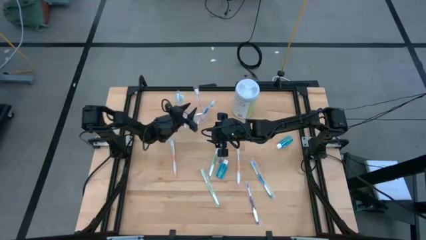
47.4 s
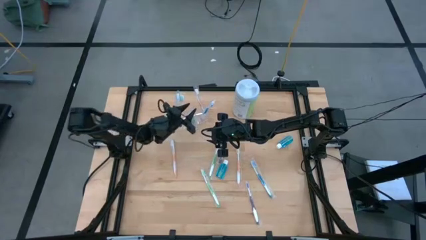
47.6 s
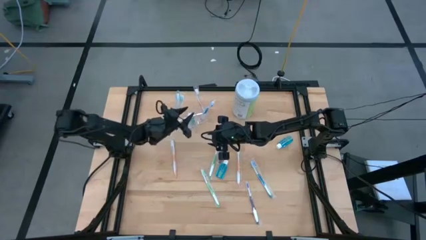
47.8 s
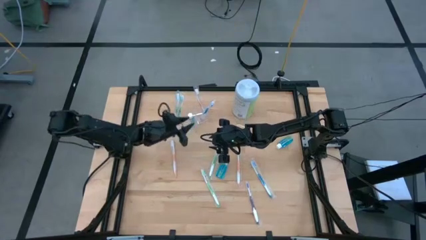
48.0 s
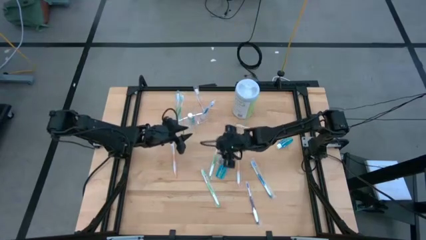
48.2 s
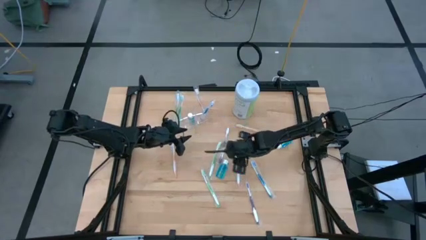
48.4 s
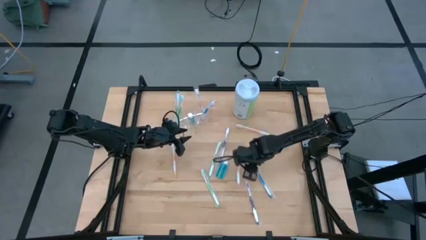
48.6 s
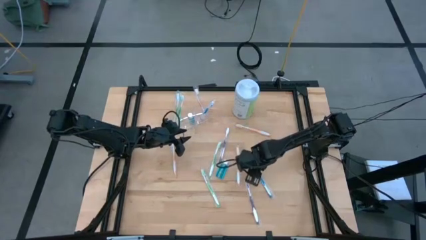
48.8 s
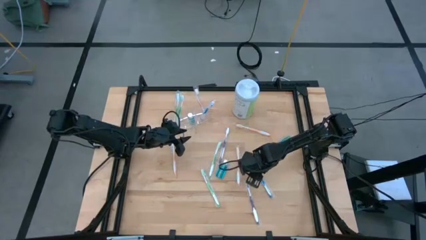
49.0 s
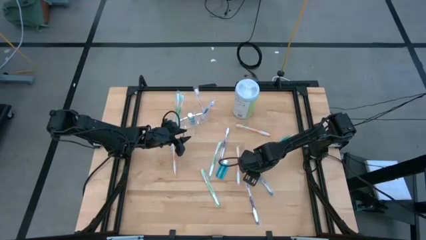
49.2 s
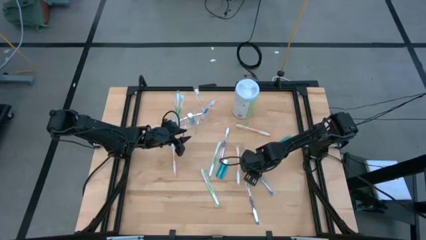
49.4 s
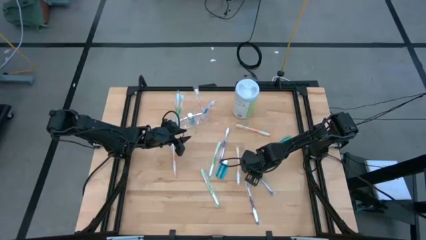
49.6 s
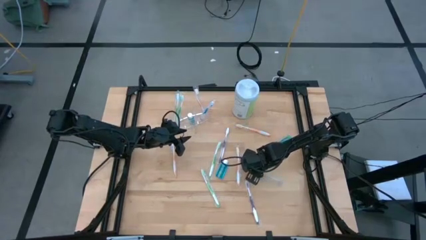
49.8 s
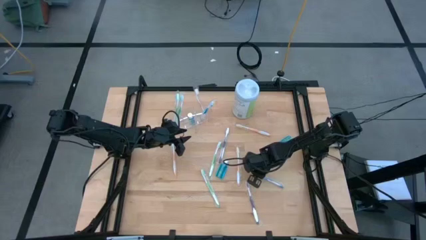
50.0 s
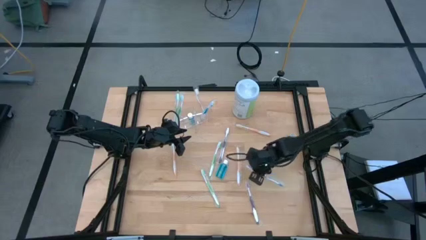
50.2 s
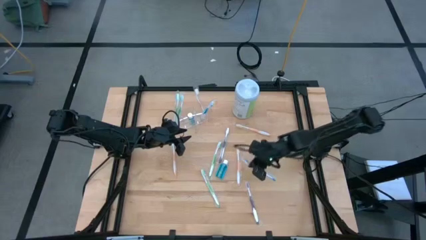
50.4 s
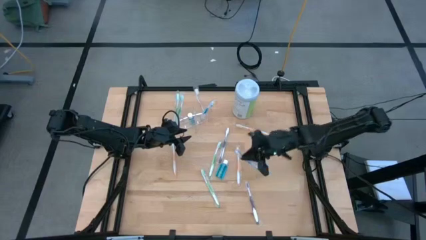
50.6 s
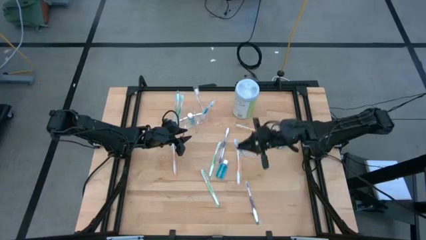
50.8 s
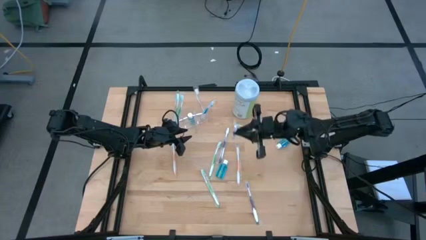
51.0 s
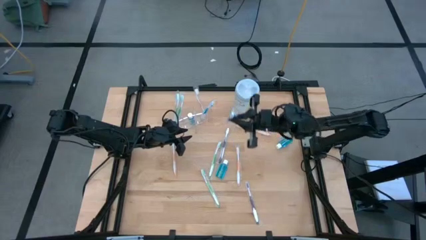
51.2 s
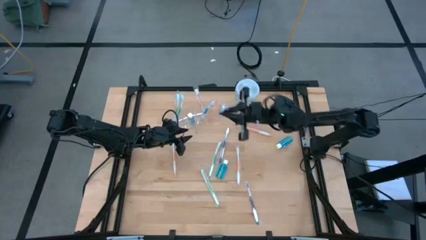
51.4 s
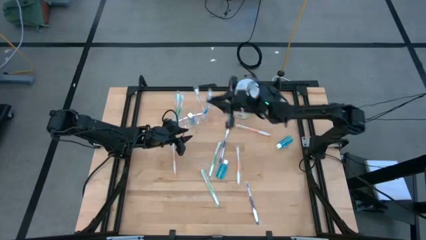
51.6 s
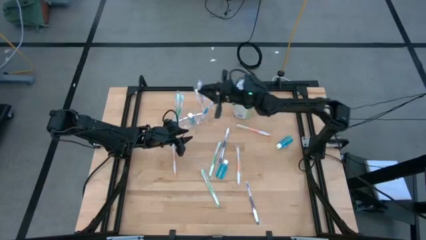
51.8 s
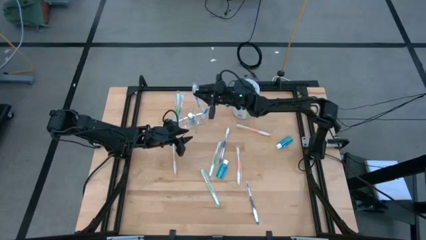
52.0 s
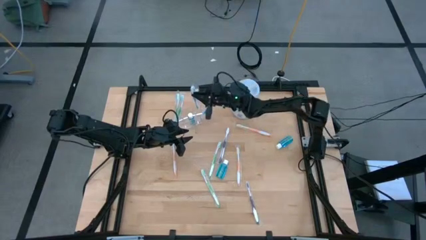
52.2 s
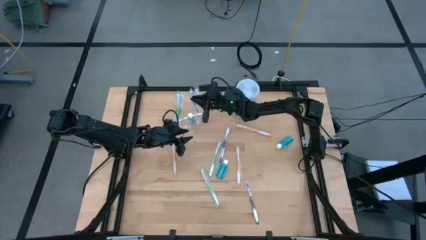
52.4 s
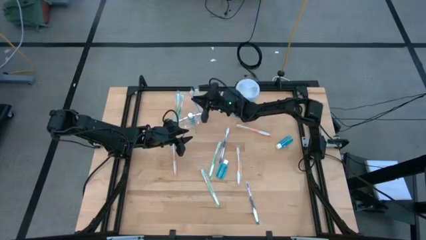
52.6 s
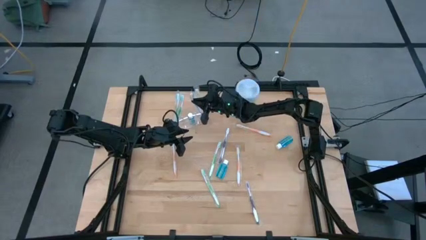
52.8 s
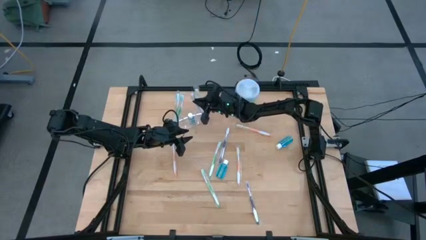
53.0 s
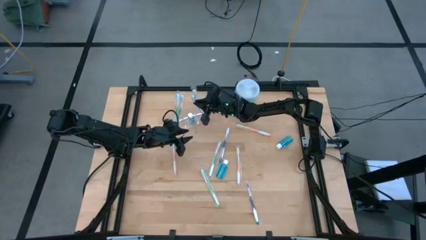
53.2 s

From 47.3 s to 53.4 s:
Task: Pick & Place toothbrushing station
Put the blue toothbrush into the transparent organizer

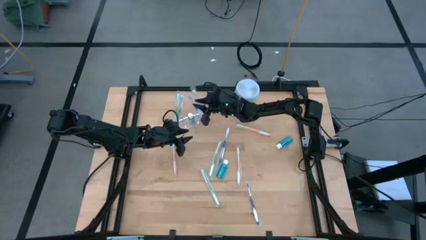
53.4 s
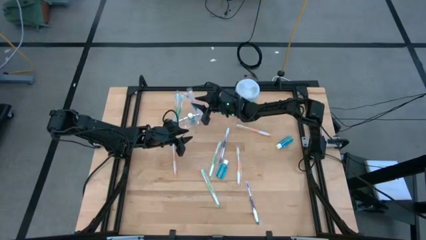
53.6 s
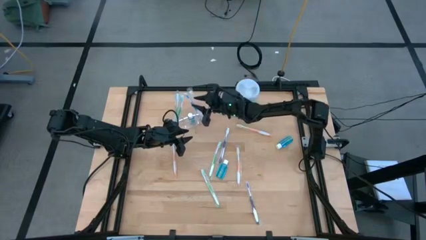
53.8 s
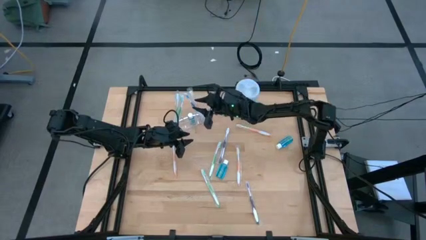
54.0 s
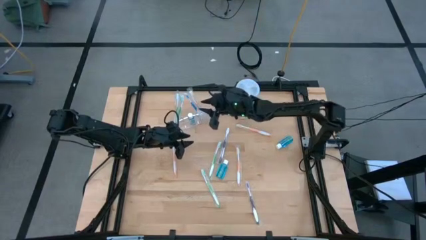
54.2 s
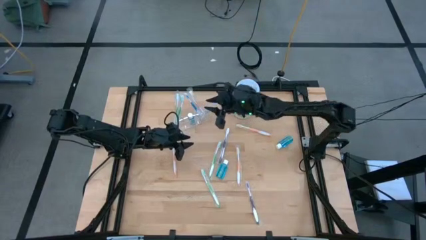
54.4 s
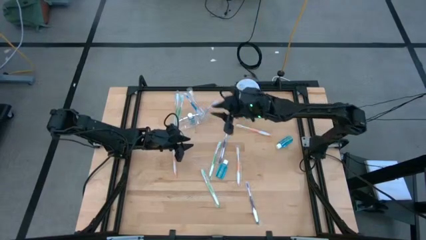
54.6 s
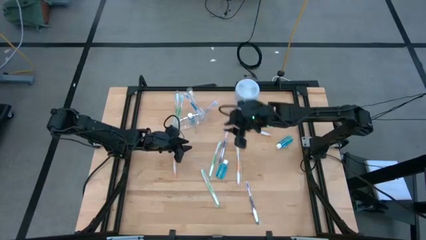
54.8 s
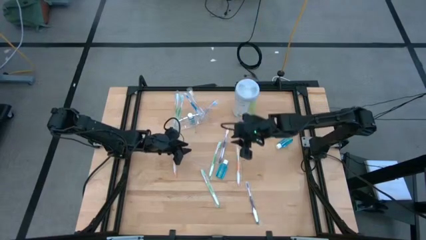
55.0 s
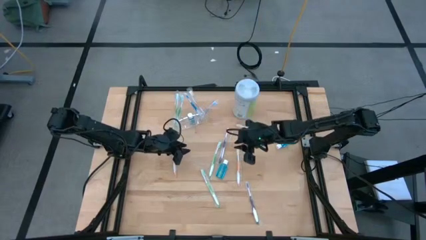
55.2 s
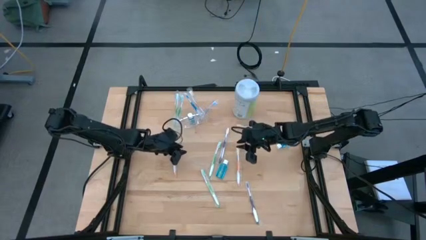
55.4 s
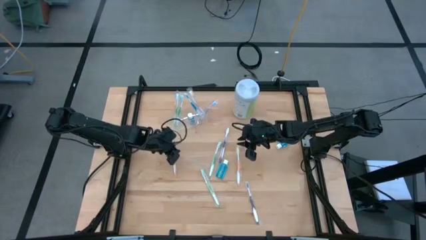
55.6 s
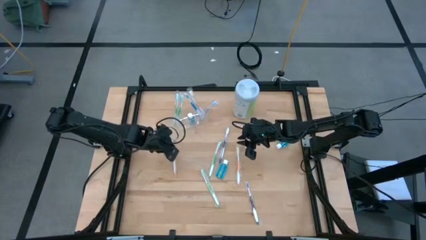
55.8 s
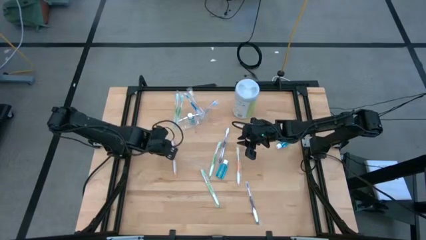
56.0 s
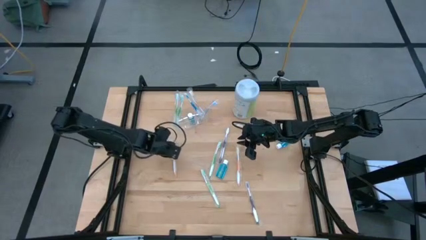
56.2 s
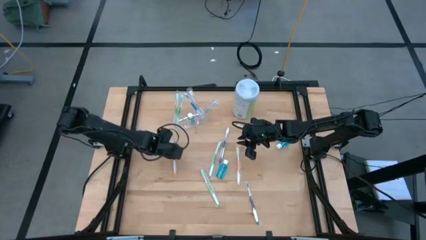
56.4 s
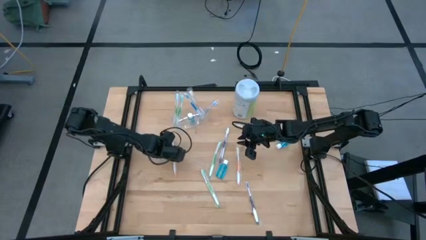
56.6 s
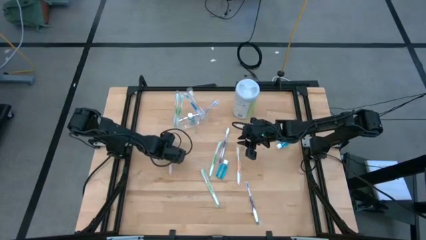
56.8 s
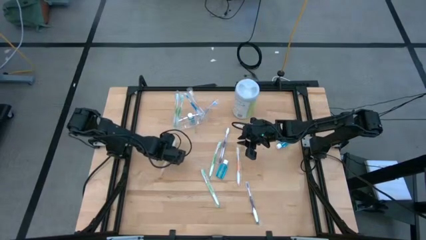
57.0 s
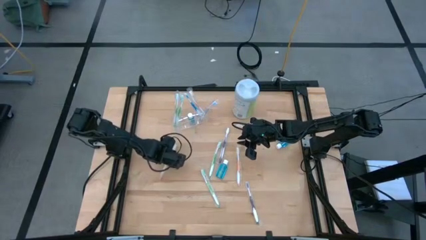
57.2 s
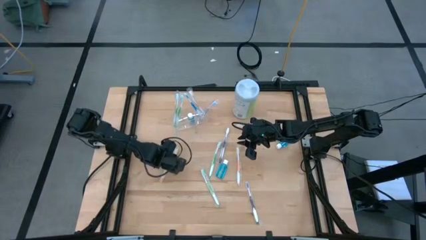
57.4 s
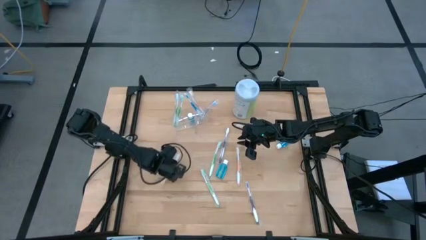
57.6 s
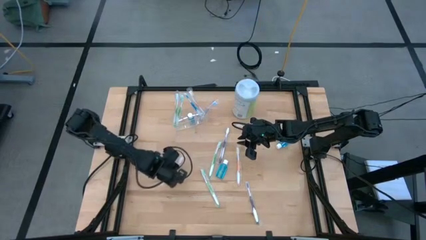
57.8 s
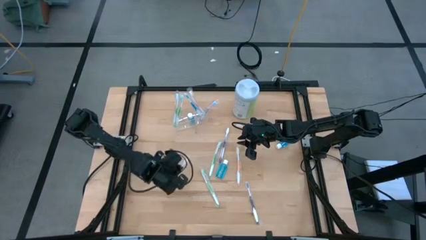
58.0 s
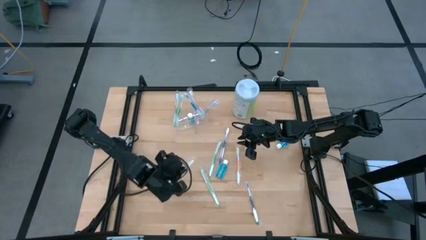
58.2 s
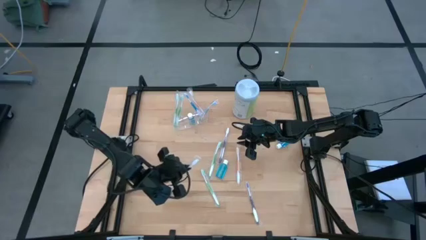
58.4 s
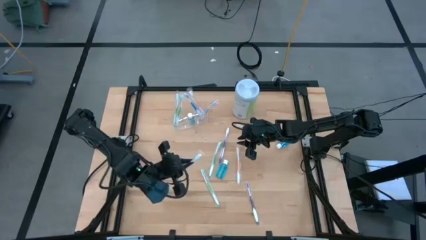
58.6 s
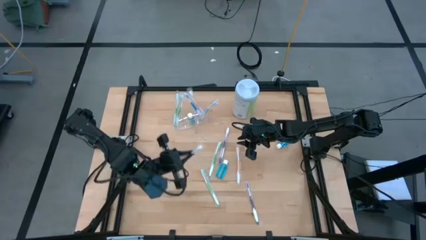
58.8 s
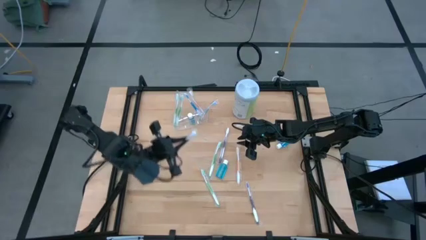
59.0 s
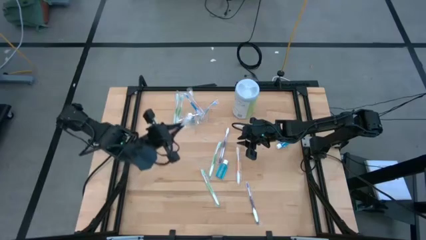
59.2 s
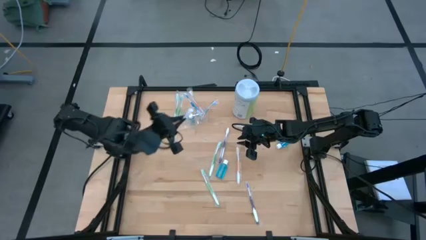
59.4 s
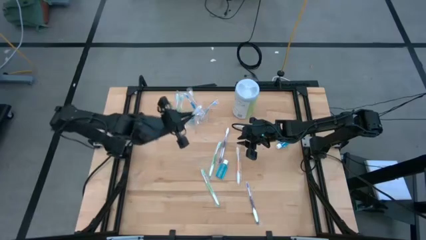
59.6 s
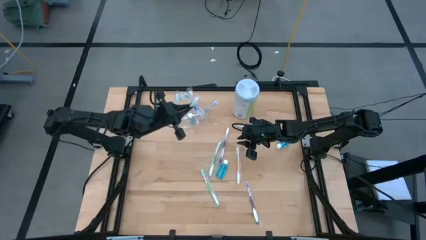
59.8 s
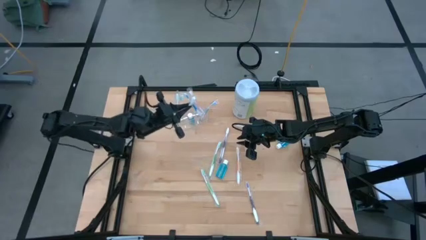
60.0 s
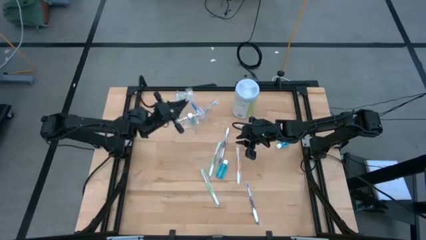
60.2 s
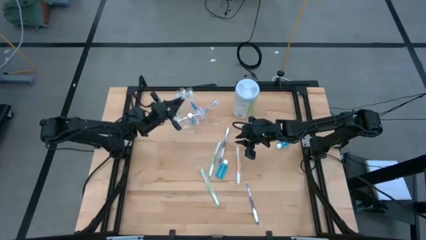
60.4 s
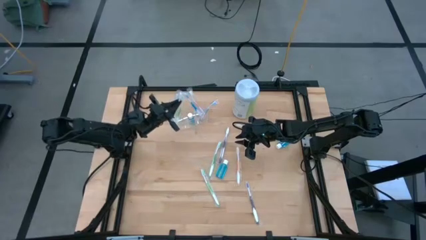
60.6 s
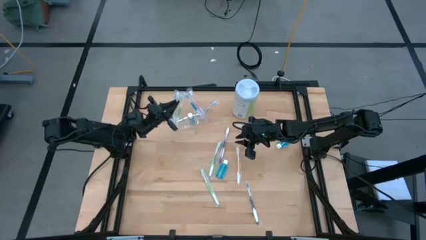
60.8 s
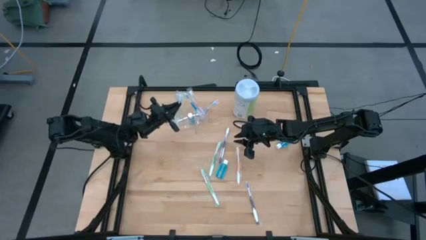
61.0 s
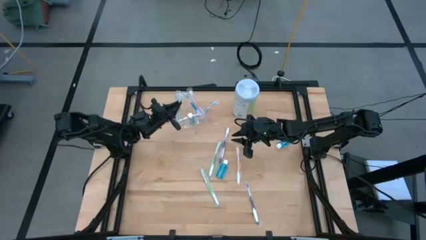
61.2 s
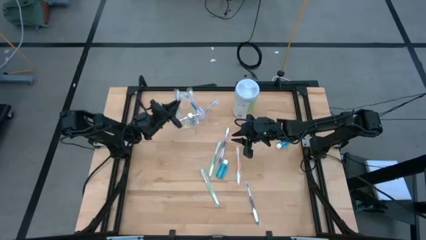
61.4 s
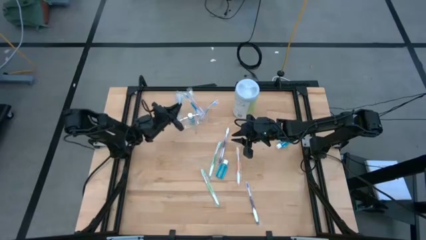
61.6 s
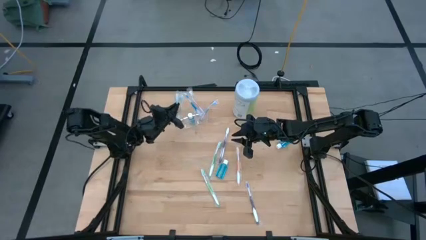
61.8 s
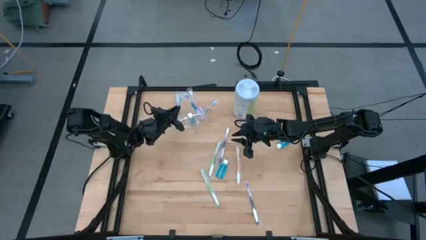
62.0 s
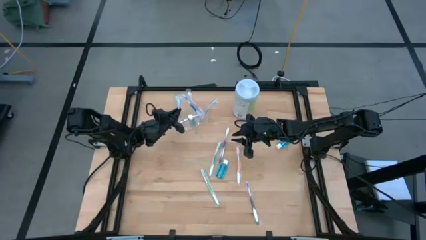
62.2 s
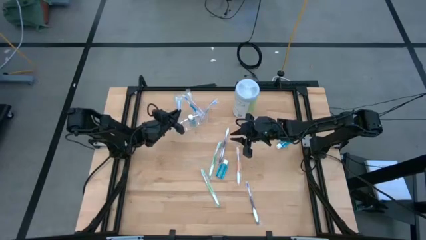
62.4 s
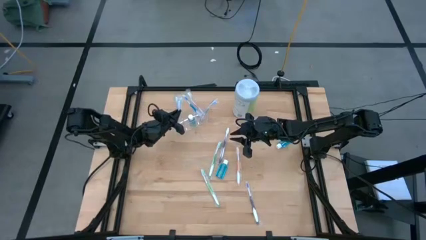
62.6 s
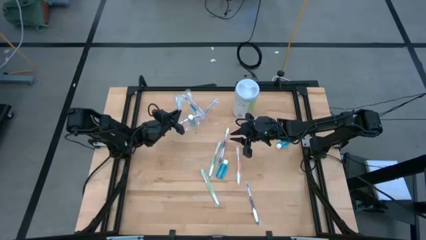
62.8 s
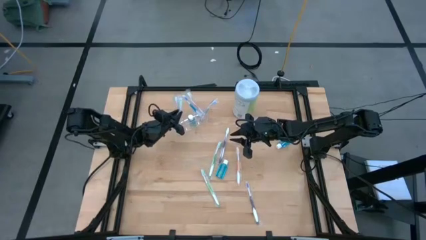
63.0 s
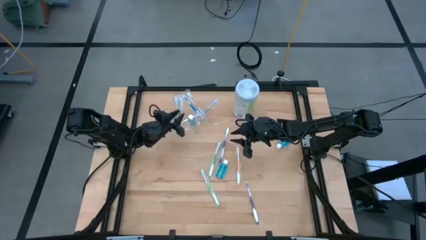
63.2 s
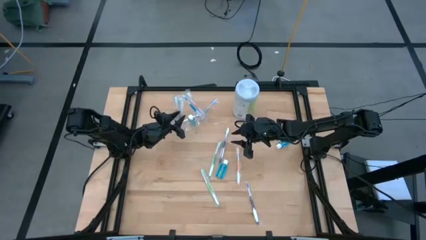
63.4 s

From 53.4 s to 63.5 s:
Put the orange toothbrush into the transparent organizer

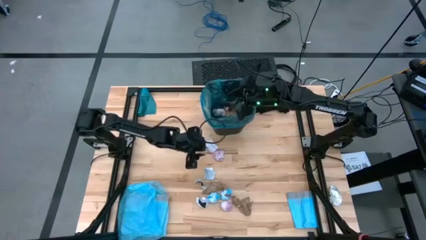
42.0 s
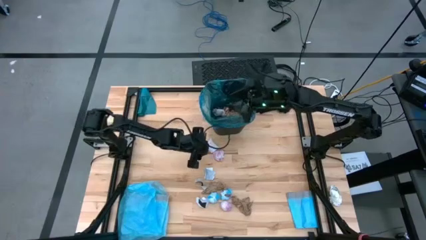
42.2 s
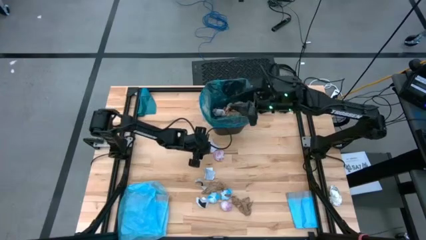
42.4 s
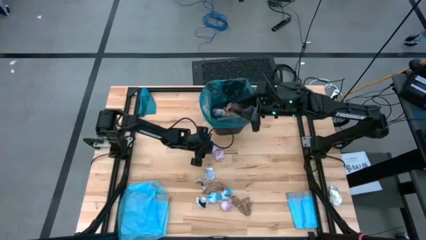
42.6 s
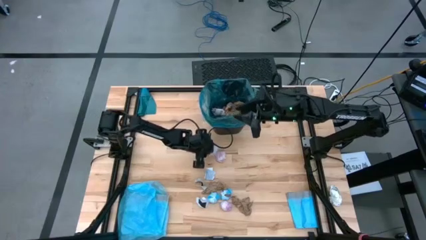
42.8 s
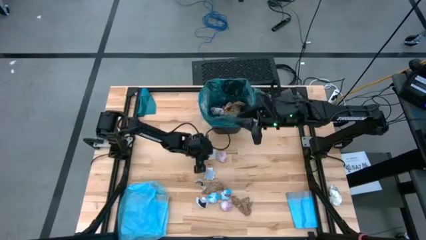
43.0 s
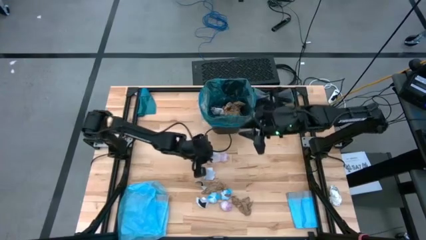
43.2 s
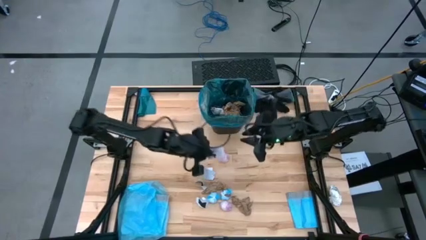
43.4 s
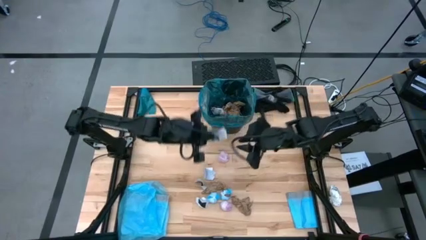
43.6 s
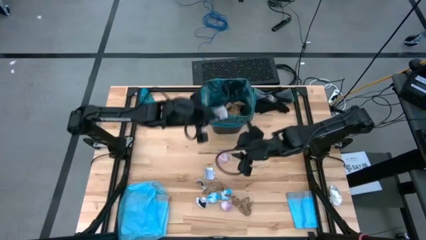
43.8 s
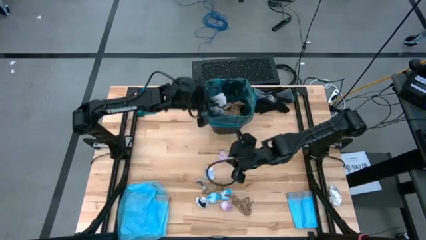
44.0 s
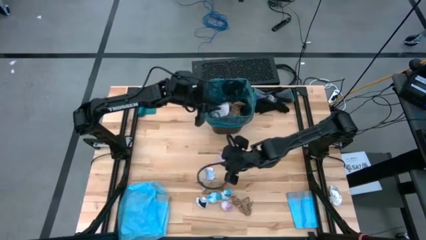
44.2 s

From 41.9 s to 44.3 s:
Task: place trash/remove bag and relplace
Put the white paper into the blue trash bag inside the black trash bin
